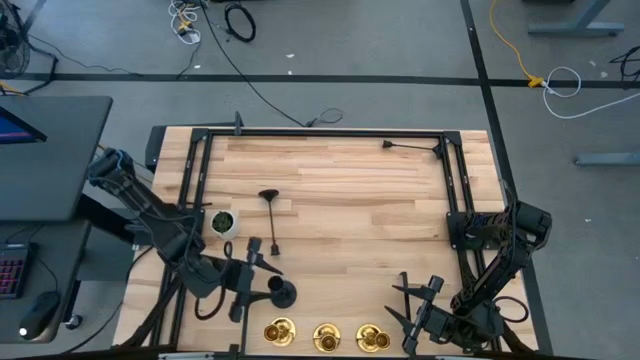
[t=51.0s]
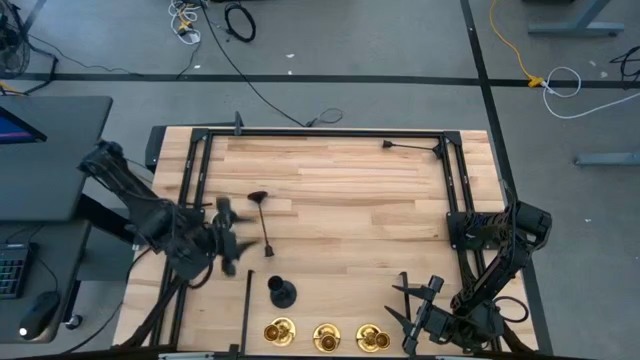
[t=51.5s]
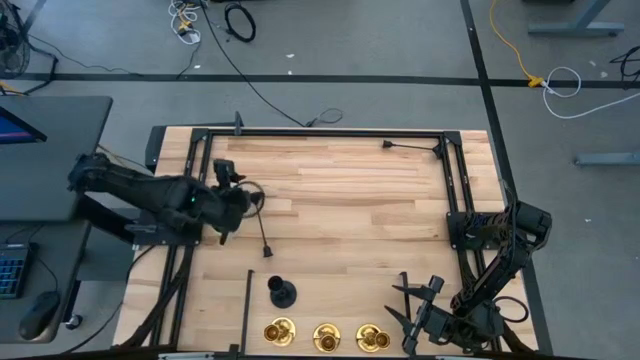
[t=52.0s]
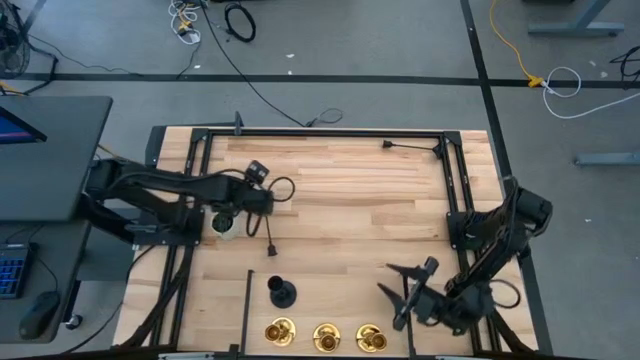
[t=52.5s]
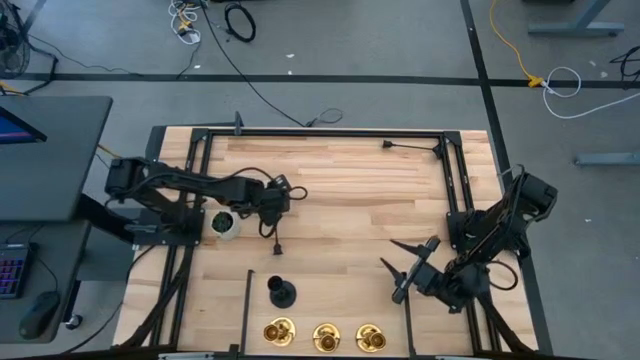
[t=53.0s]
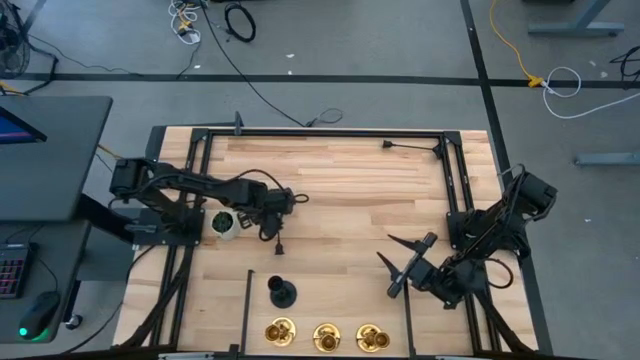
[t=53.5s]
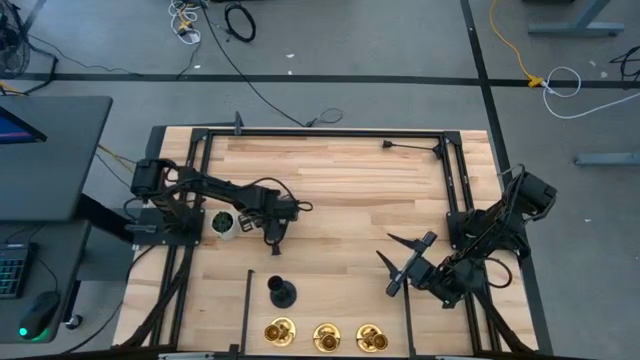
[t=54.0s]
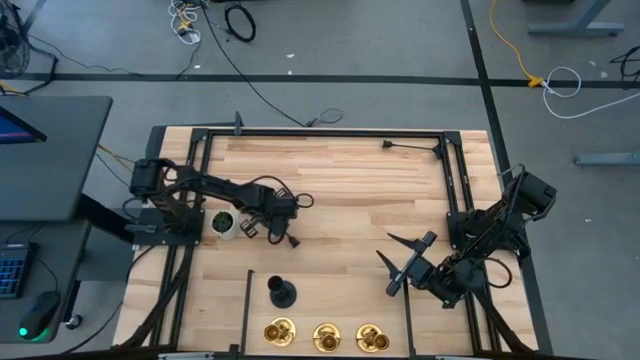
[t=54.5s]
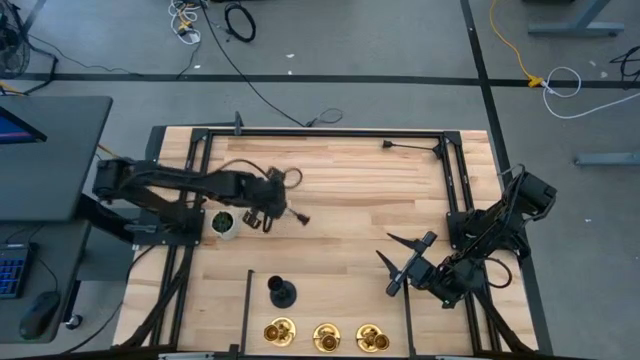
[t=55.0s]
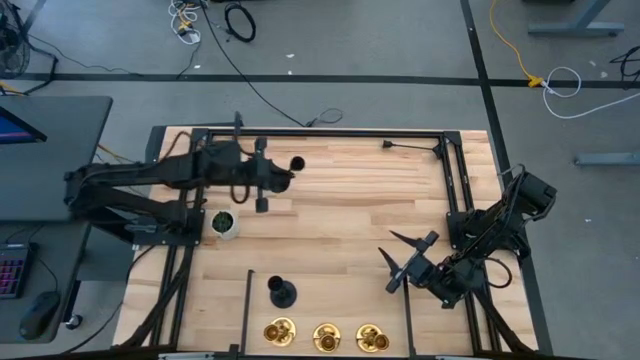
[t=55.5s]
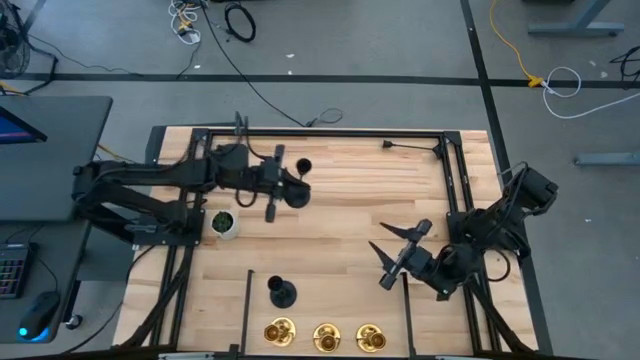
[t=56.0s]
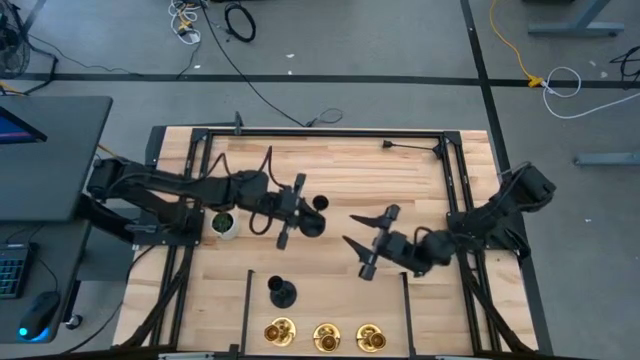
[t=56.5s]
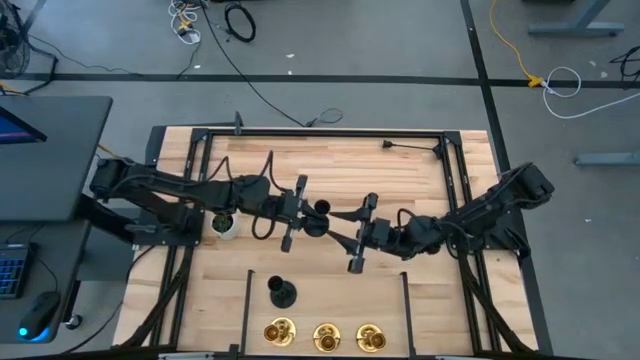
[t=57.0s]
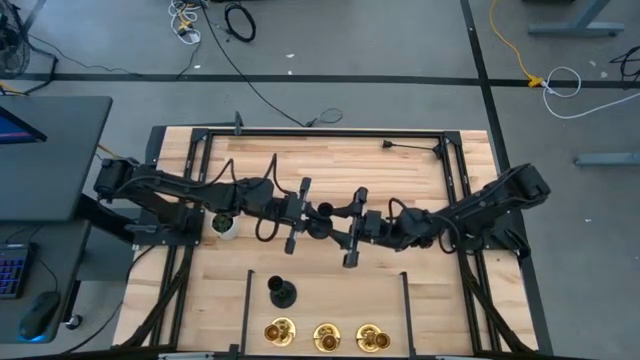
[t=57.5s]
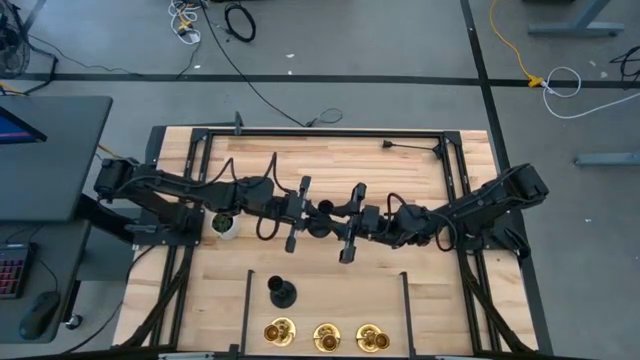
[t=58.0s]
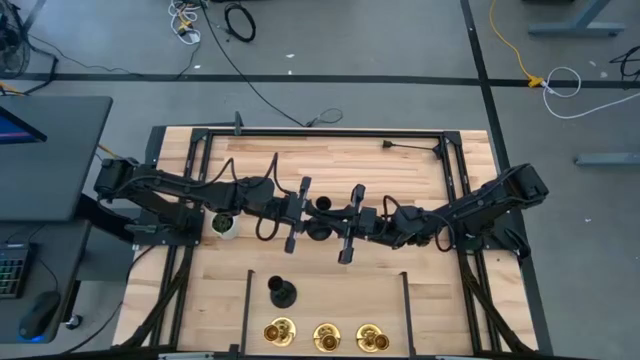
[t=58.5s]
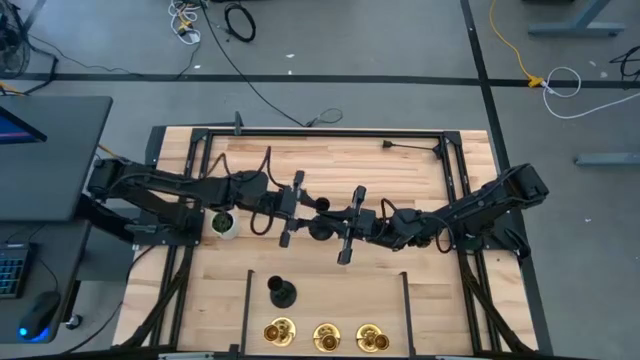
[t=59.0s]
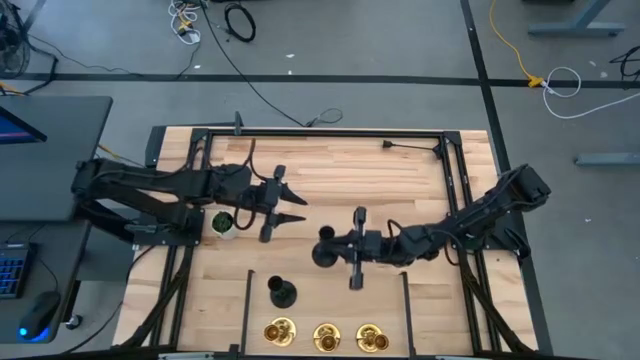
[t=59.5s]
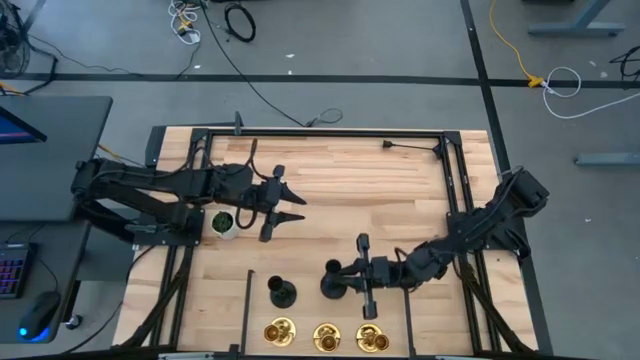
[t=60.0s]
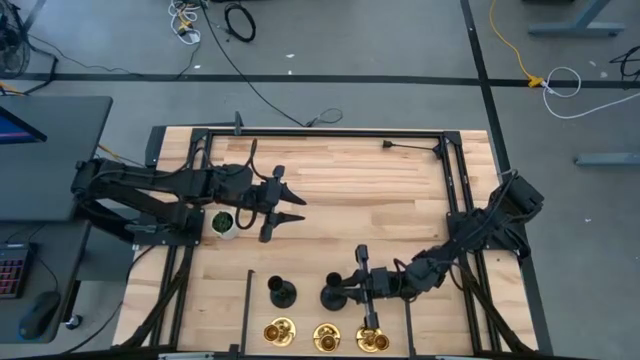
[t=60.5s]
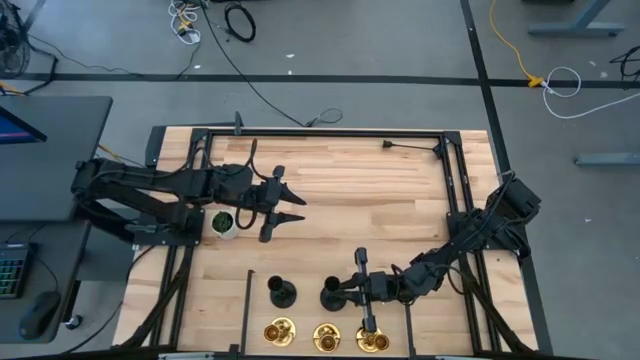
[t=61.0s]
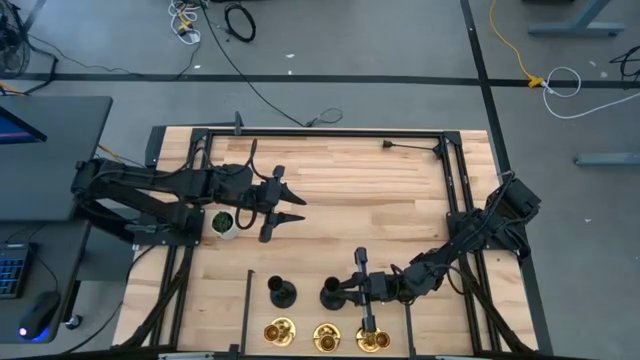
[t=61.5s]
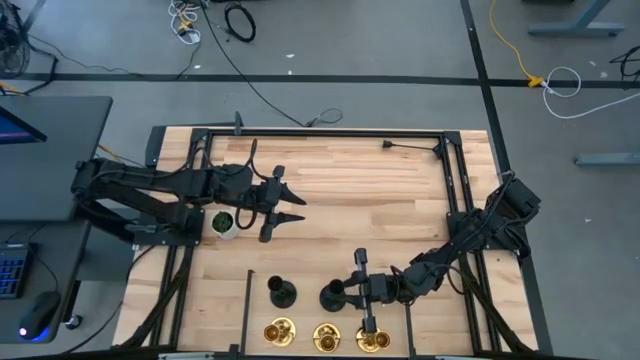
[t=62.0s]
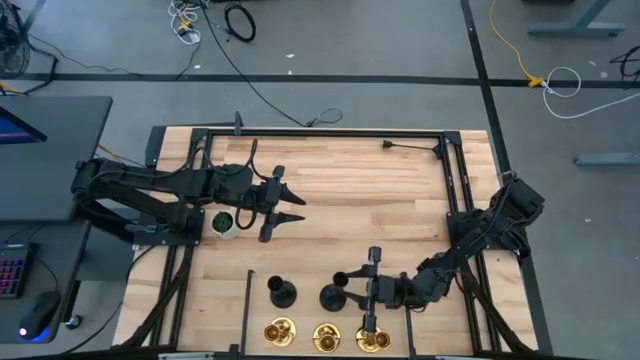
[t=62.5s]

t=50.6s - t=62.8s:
Task: Pick & Place candle stick holders
Put the left black candlestick on the shelf

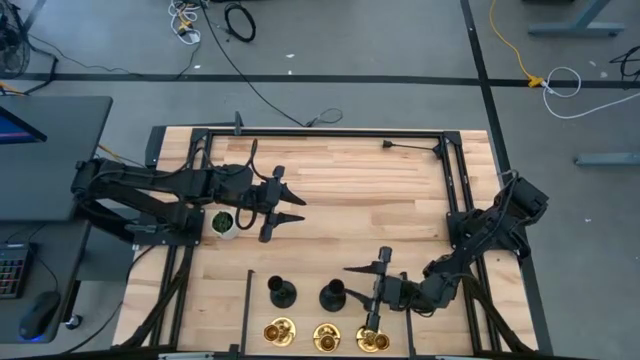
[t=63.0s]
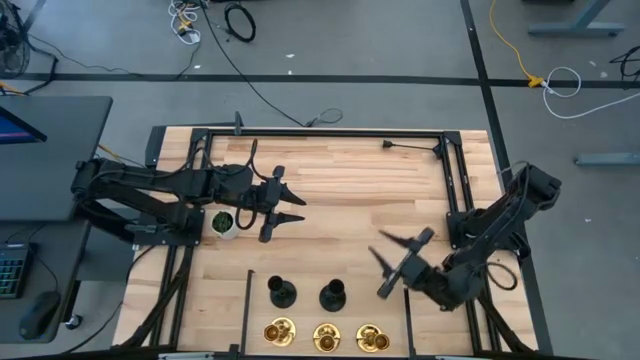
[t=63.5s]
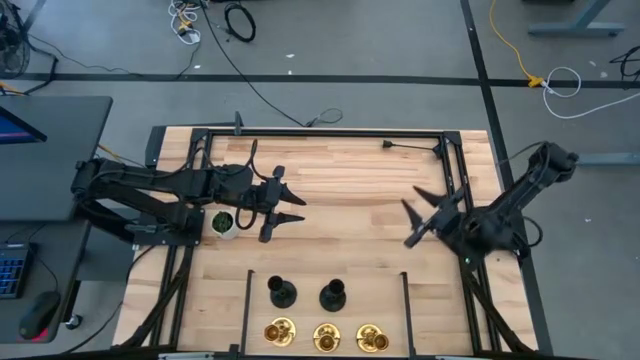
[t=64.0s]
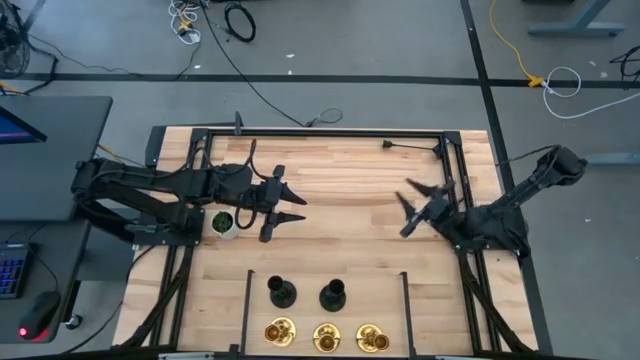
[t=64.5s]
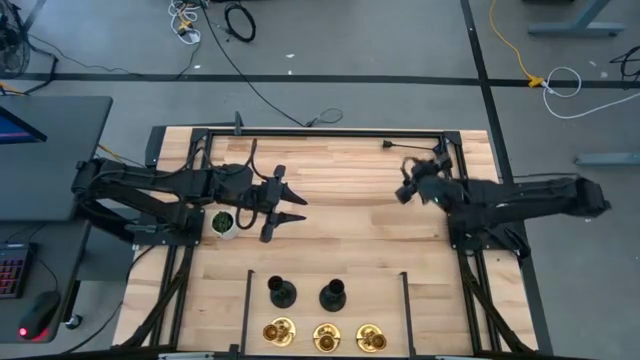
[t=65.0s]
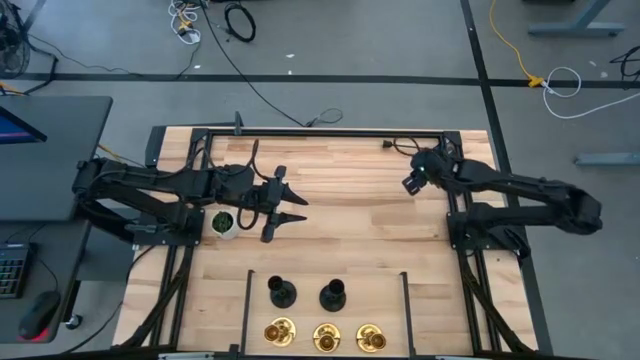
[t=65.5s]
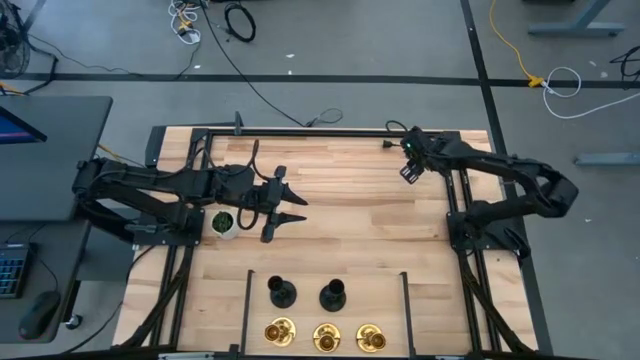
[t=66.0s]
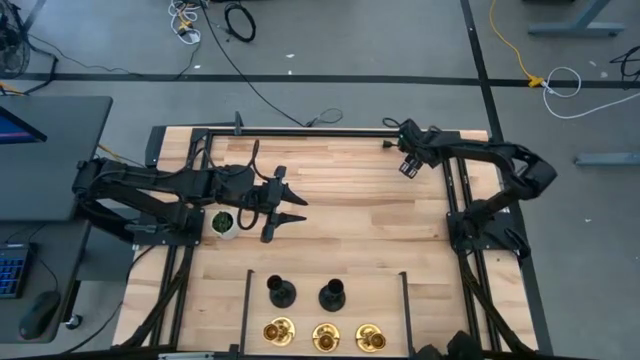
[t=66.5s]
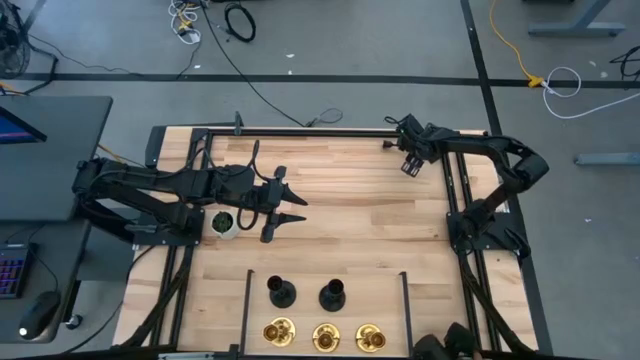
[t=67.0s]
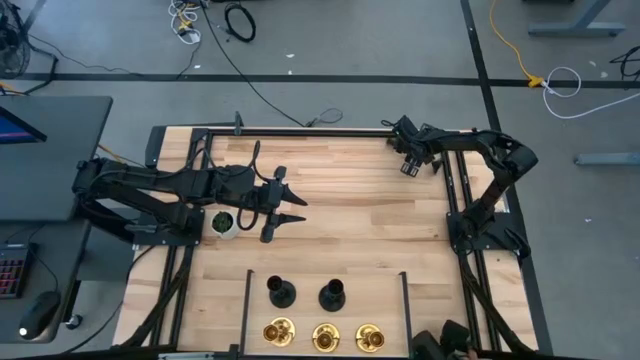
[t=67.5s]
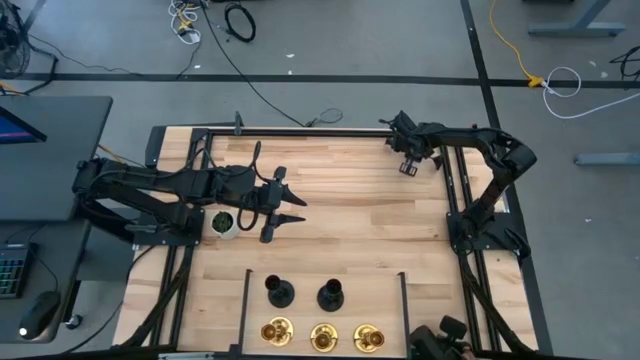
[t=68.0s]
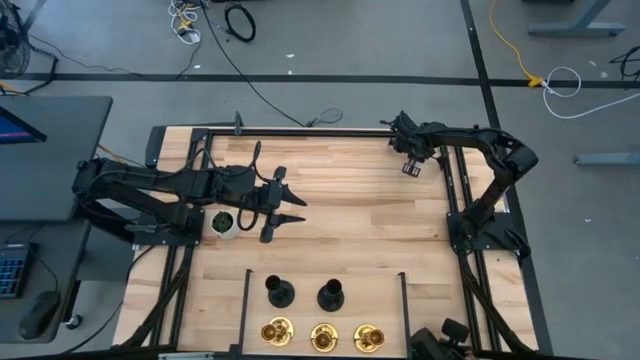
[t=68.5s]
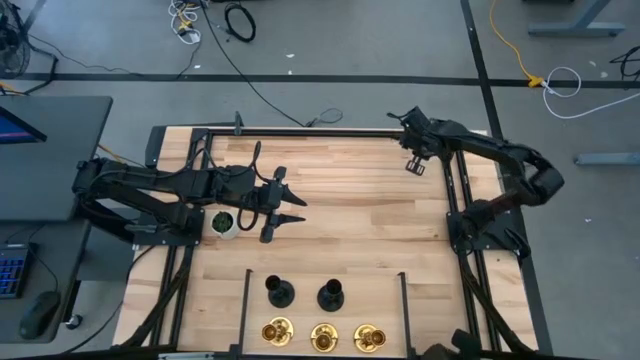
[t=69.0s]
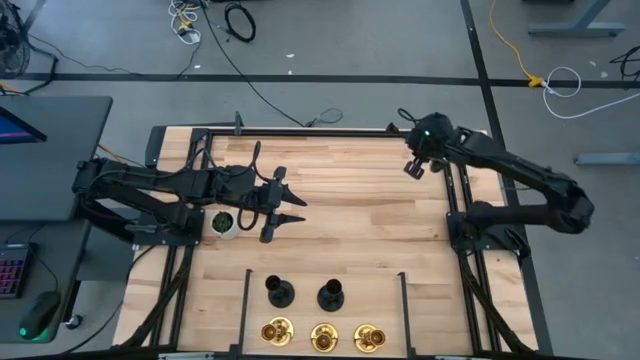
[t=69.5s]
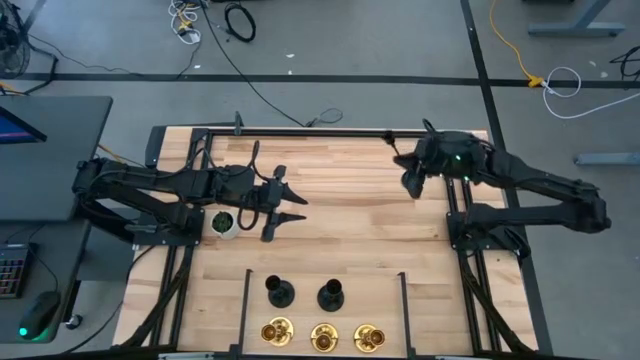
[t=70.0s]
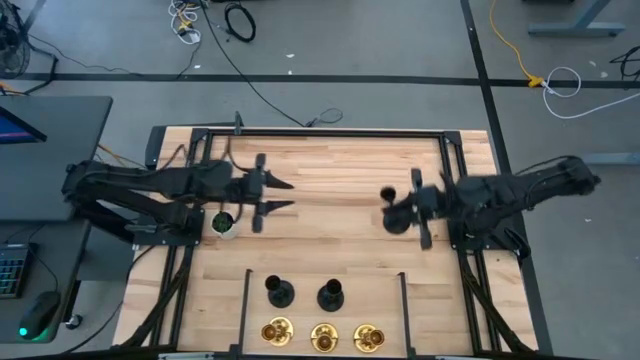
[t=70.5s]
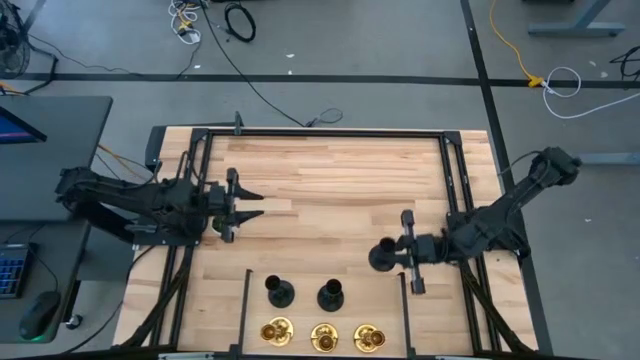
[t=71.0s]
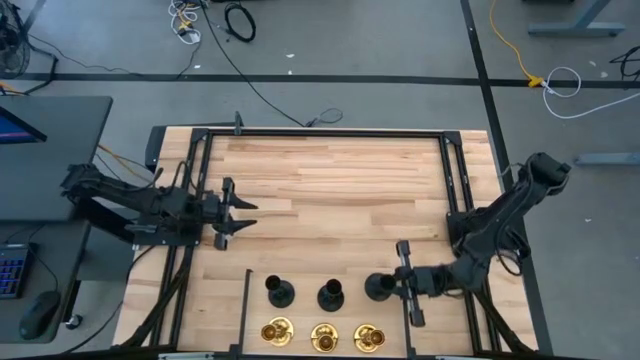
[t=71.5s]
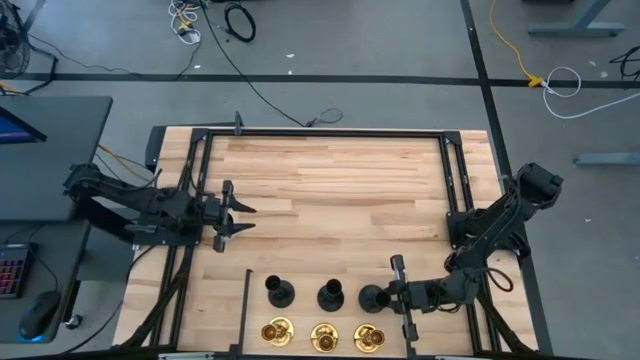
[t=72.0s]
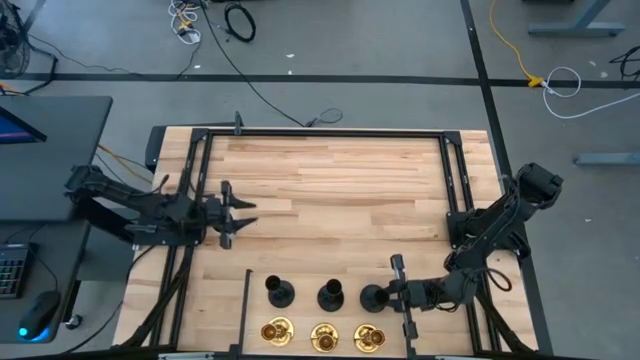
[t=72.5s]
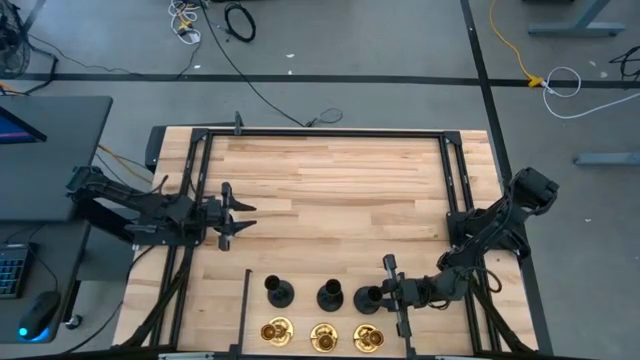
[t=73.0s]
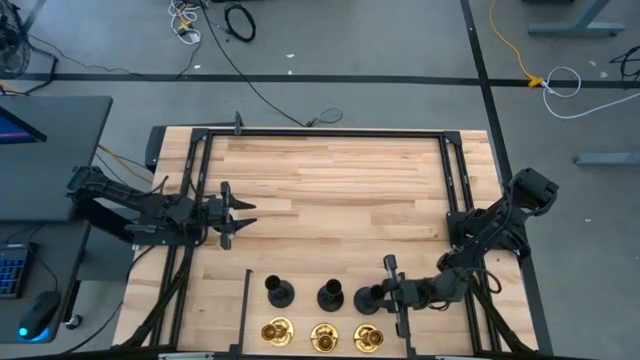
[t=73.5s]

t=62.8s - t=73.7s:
Put the black candlestick on the shelf
